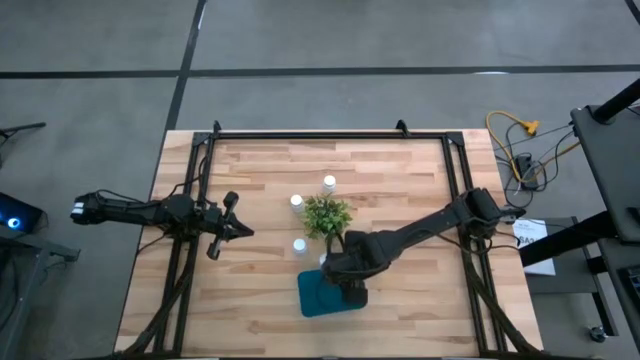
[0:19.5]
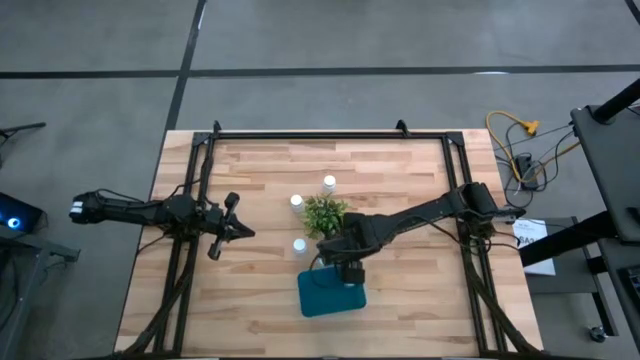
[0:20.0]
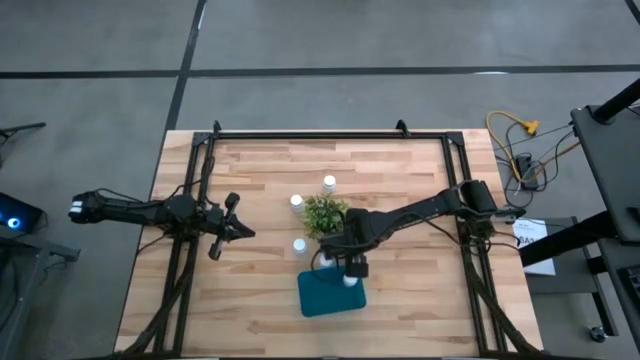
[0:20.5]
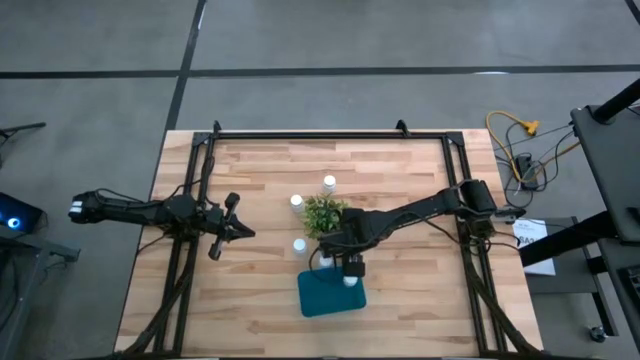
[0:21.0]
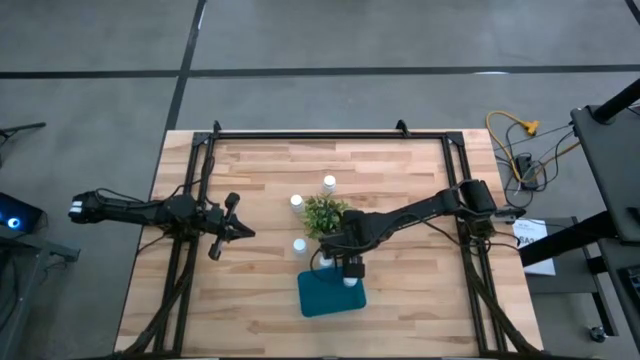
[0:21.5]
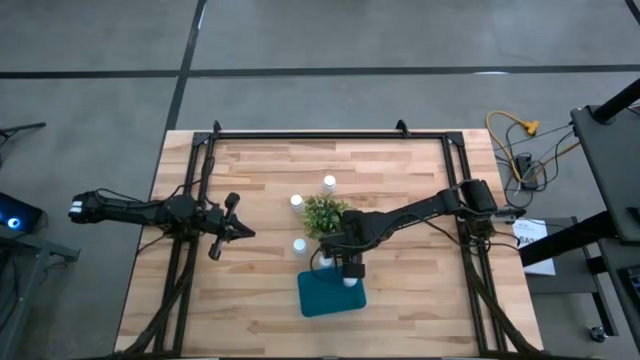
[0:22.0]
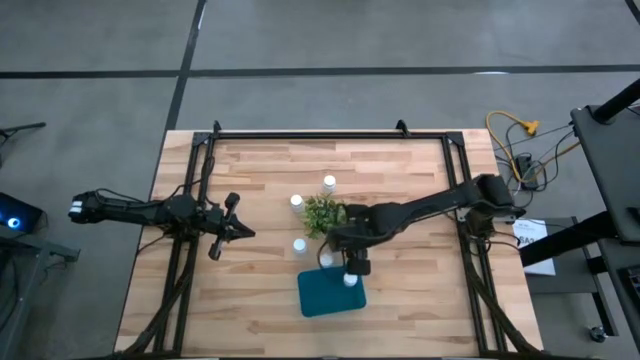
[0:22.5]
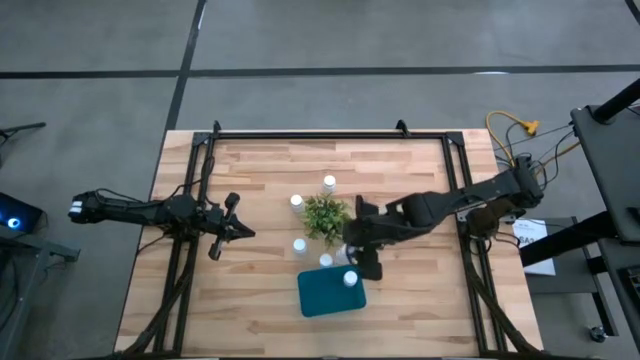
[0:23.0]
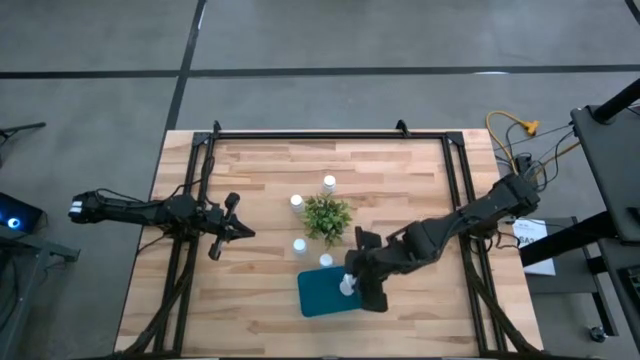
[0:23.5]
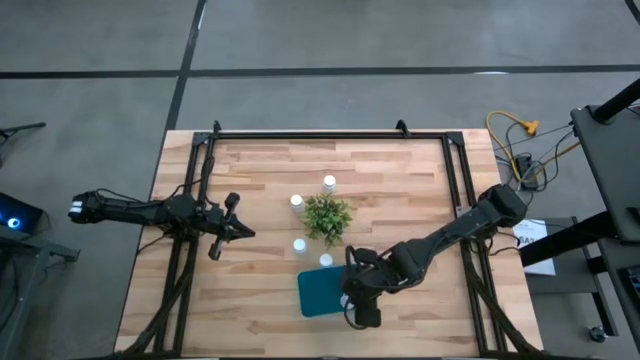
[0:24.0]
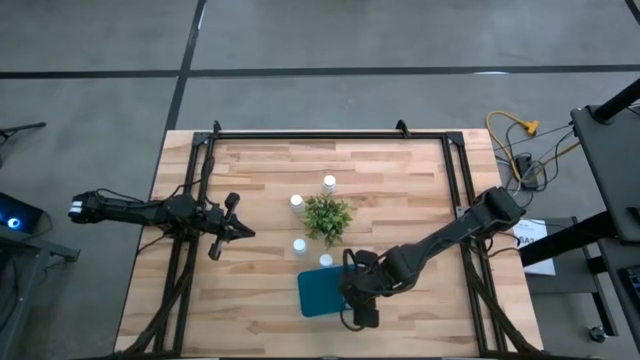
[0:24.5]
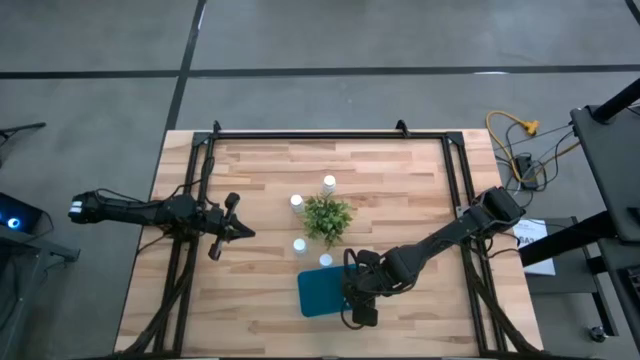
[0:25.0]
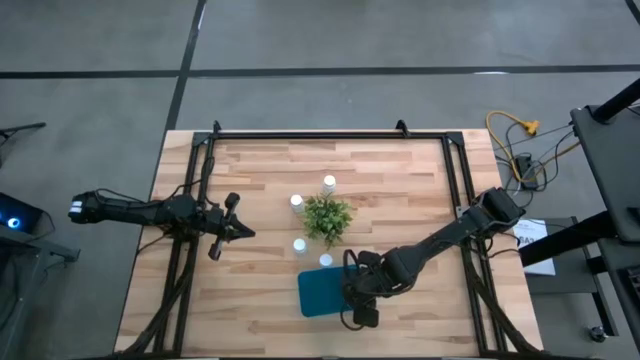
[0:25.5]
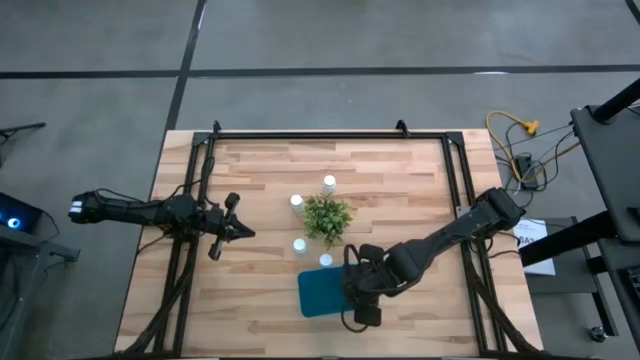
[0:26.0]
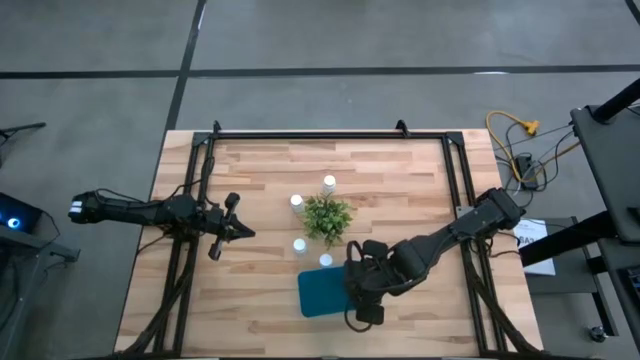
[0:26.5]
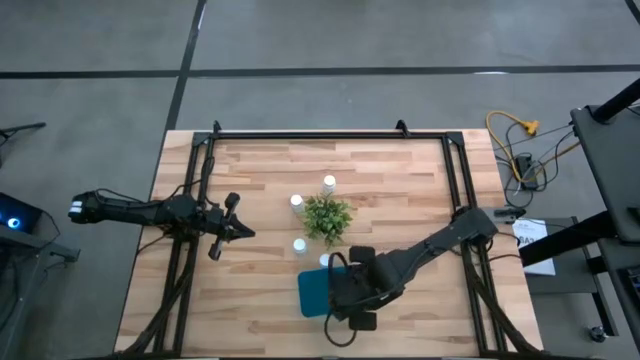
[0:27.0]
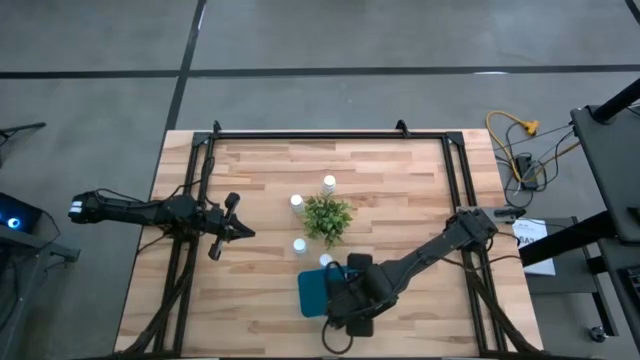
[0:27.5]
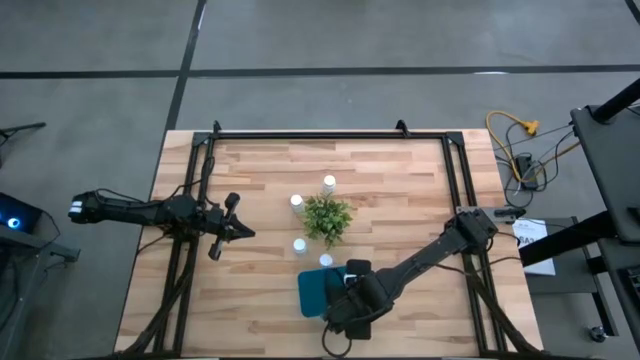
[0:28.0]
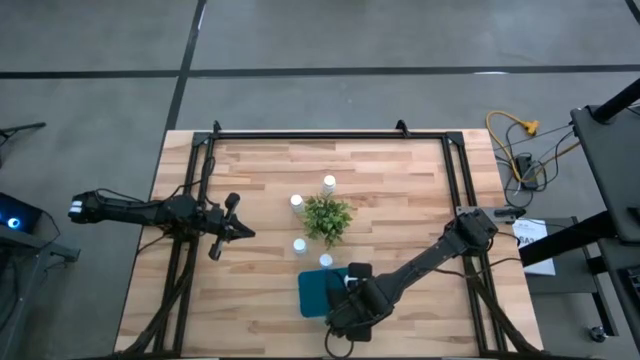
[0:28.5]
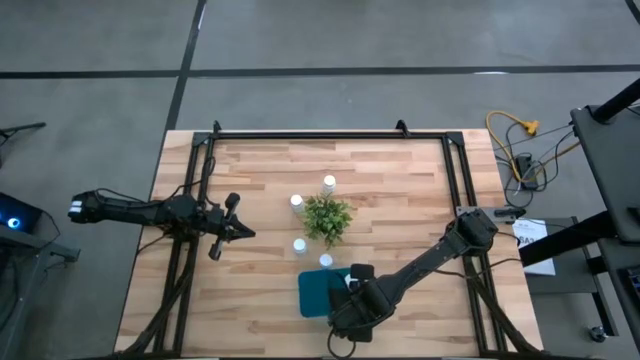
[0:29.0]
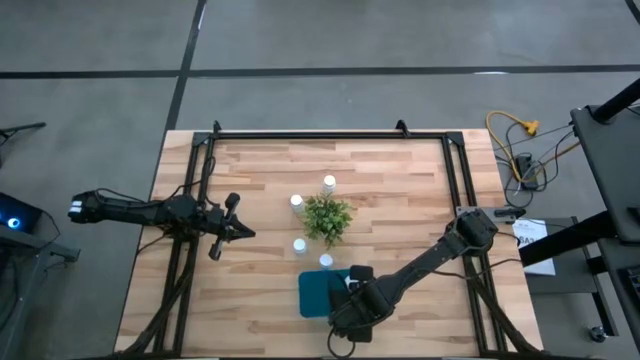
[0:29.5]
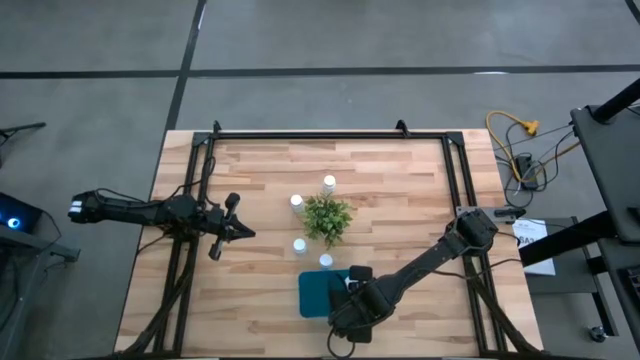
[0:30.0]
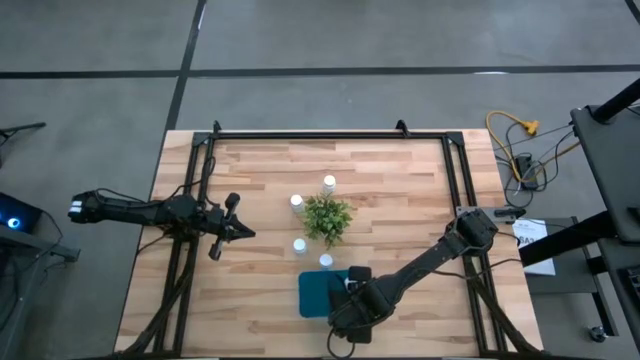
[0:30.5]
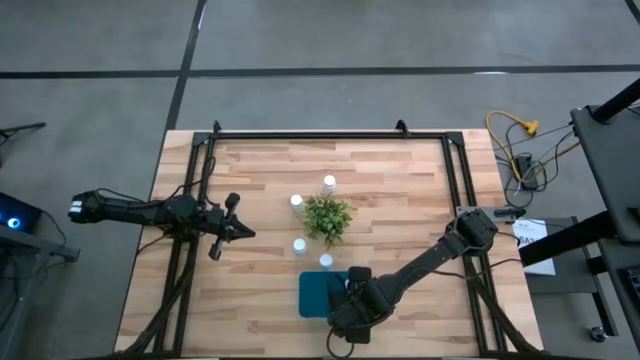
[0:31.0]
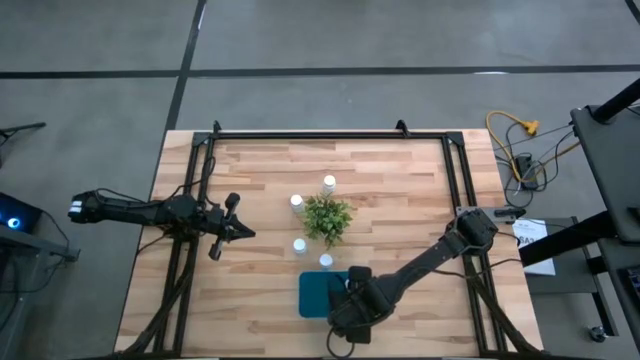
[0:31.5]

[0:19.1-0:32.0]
Task: Pick and place pill bottles into a basket
Put the white medicine bottle into the blue bin

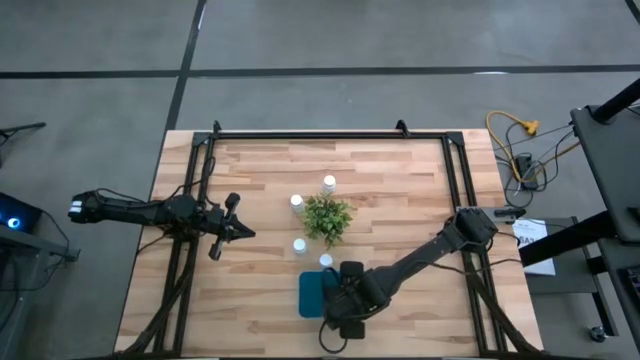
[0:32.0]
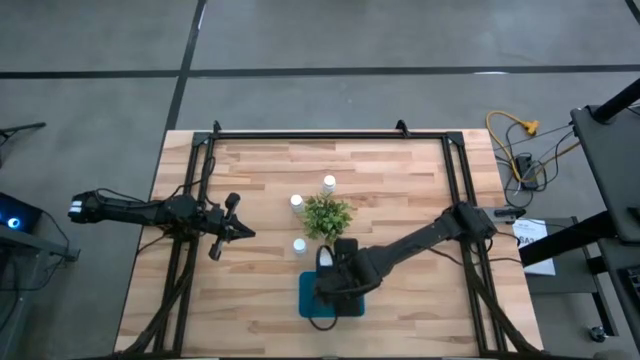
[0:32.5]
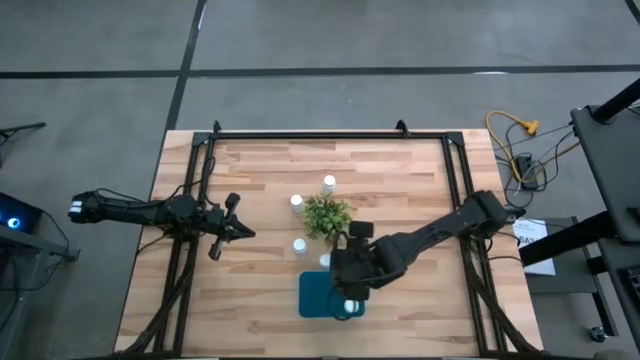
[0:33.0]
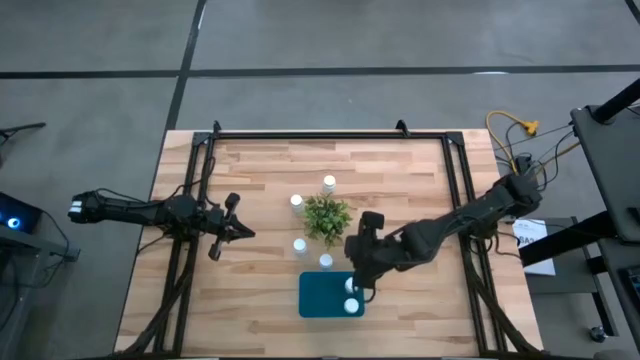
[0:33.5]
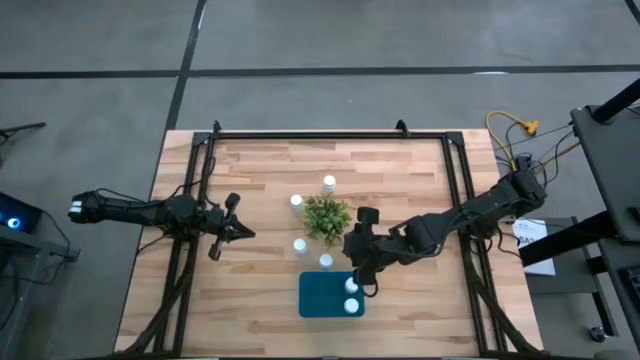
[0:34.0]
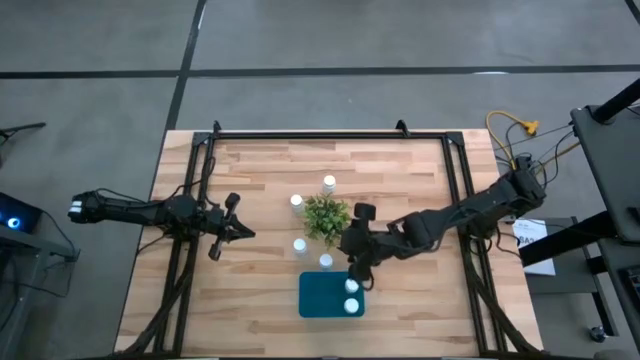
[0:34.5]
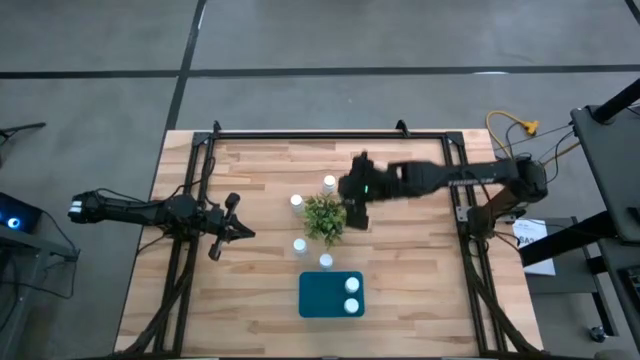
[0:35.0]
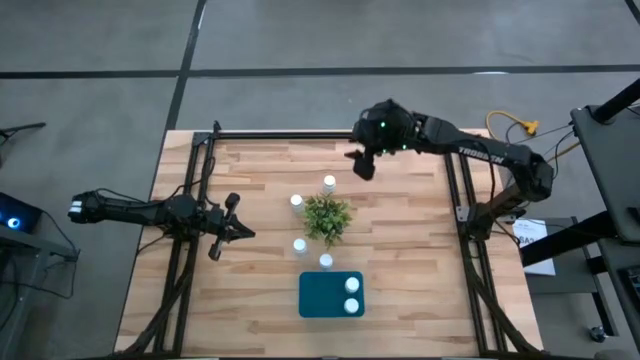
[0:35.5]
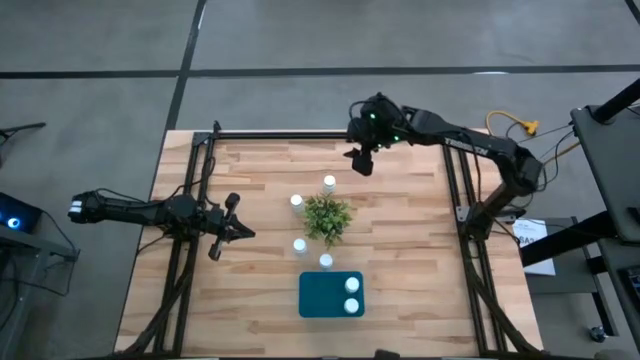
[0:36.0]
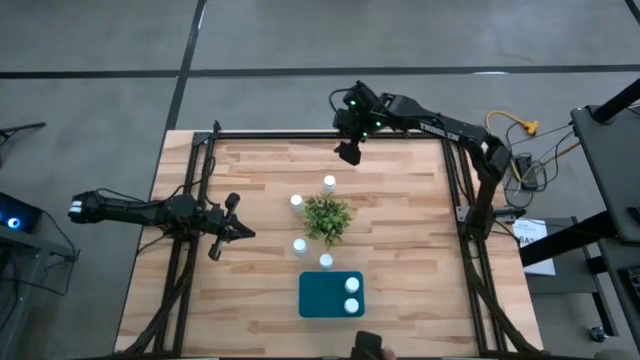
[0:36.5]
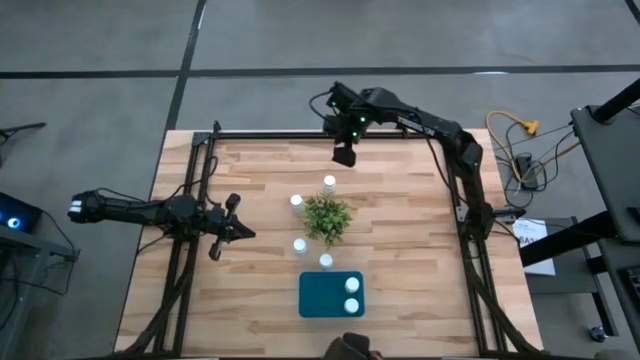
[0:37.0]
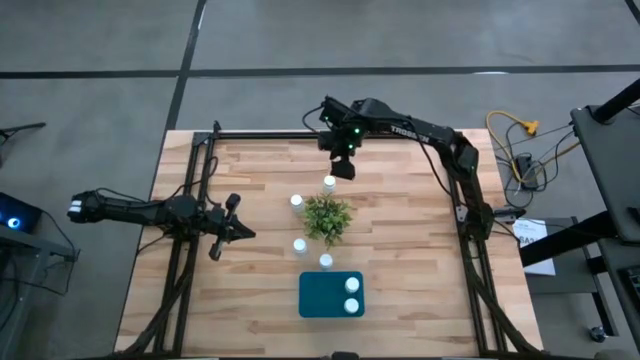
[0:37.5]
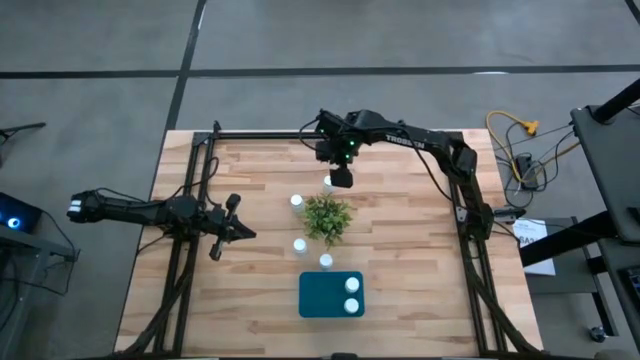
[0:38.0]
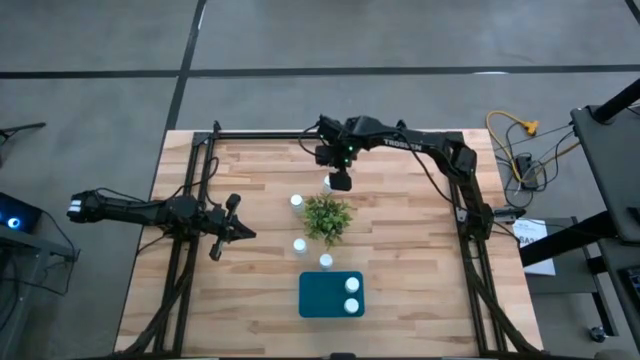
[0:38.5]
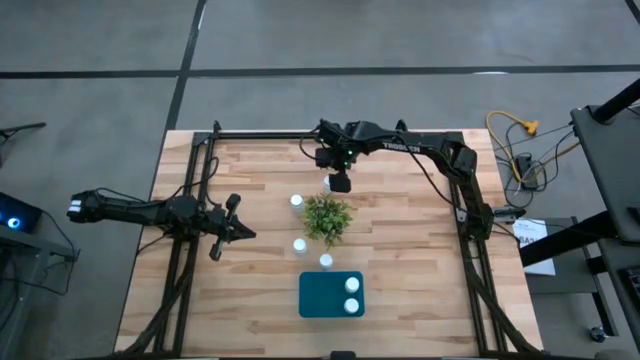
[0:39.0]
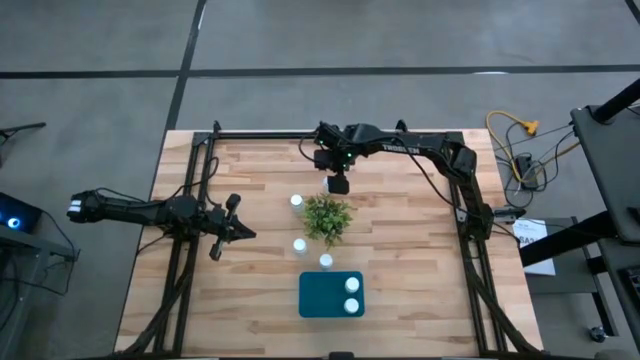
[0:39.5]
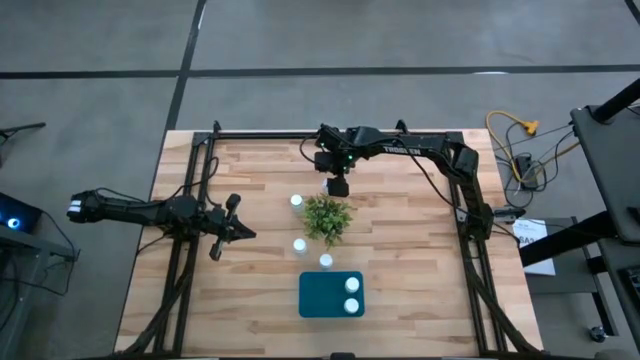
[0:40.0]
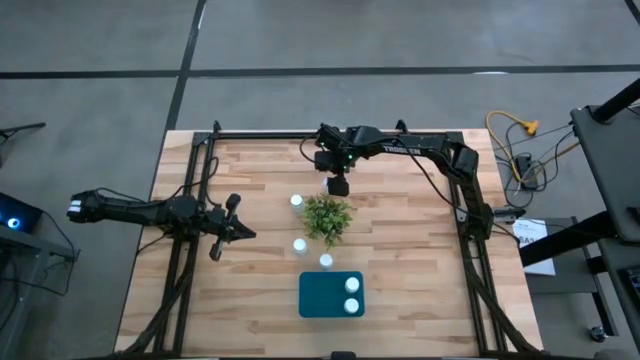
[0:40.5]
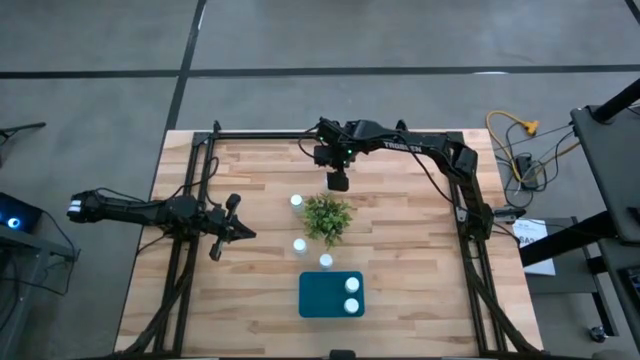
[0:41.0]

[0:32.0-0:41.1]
Put the white medicine bottle into the blue bin
